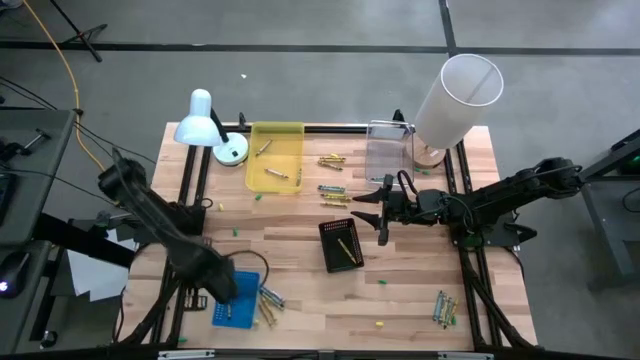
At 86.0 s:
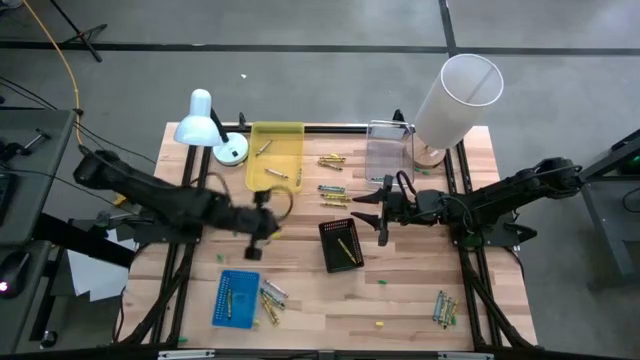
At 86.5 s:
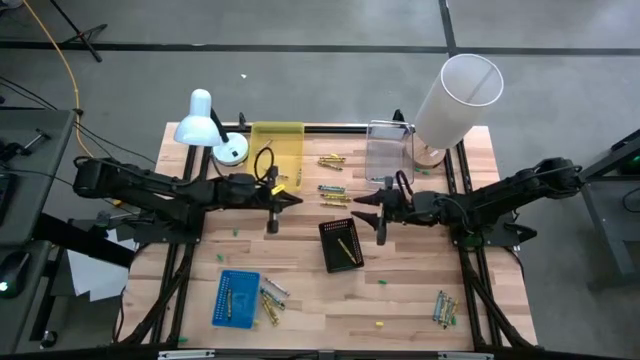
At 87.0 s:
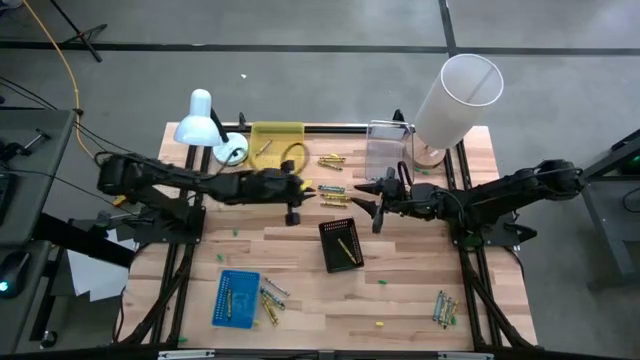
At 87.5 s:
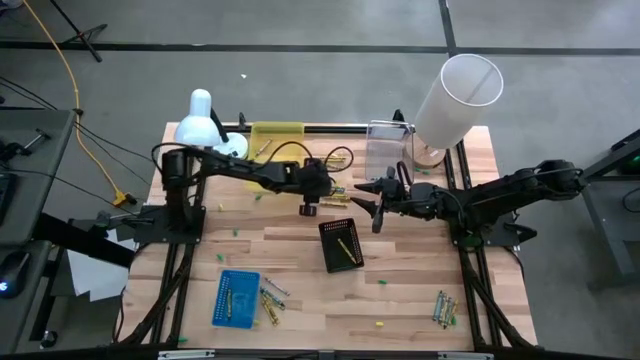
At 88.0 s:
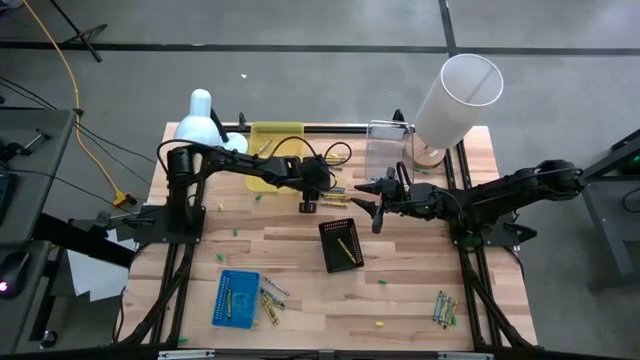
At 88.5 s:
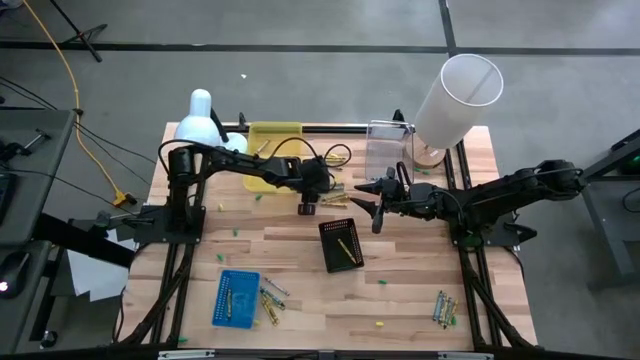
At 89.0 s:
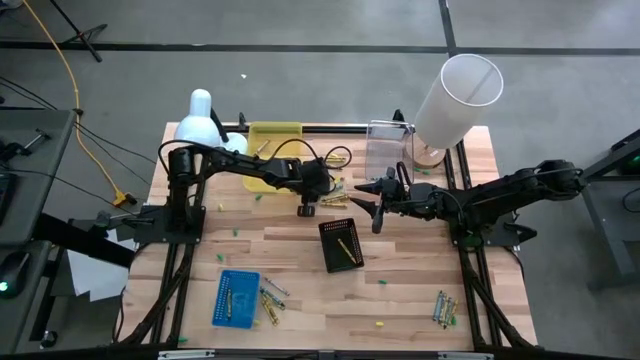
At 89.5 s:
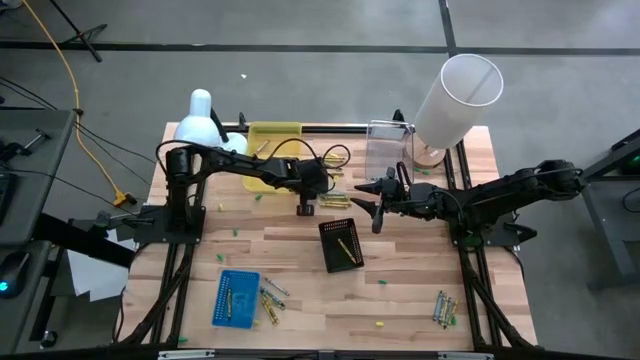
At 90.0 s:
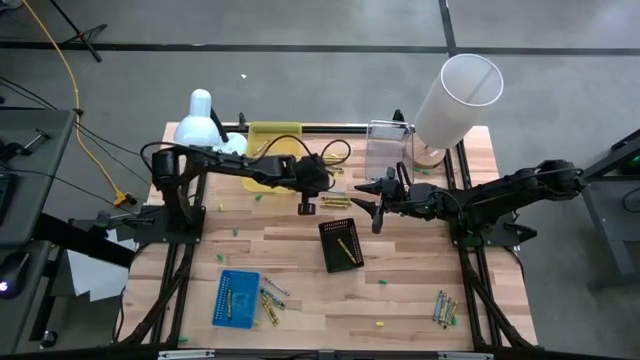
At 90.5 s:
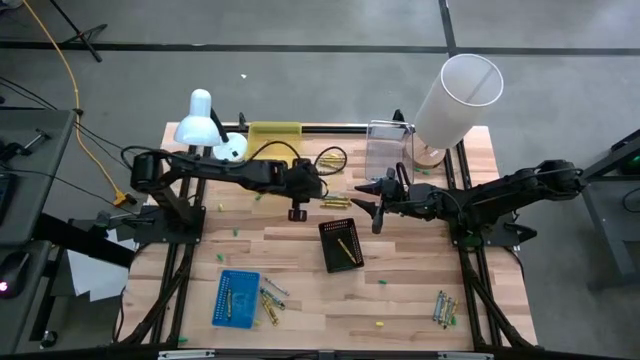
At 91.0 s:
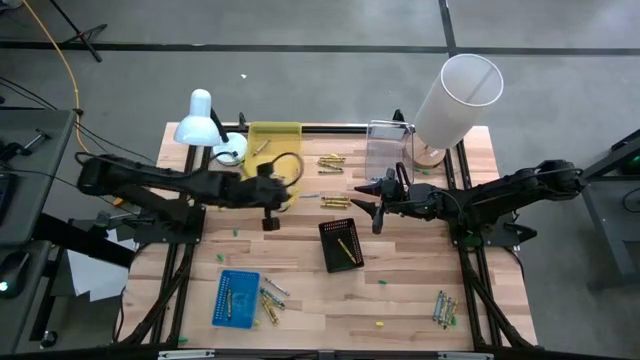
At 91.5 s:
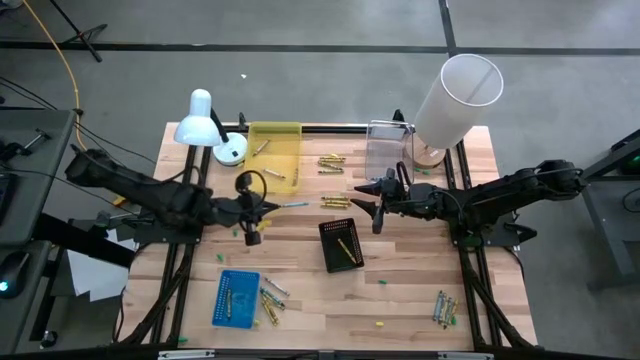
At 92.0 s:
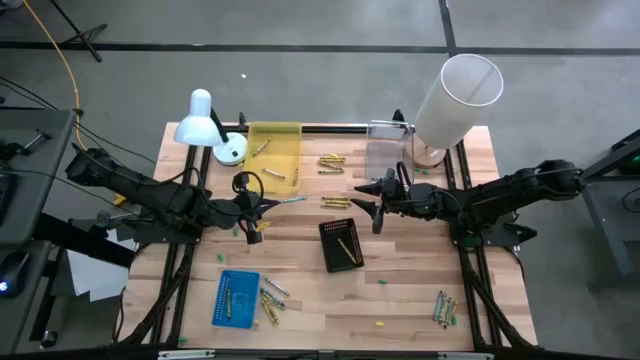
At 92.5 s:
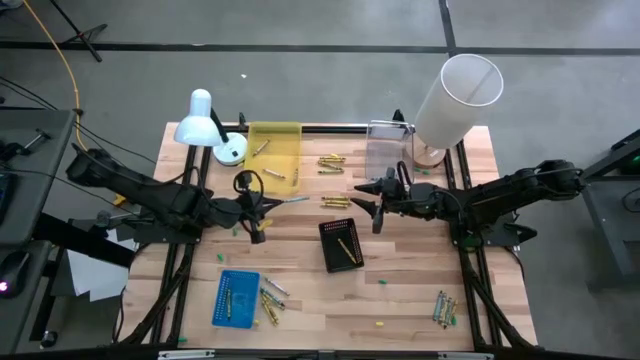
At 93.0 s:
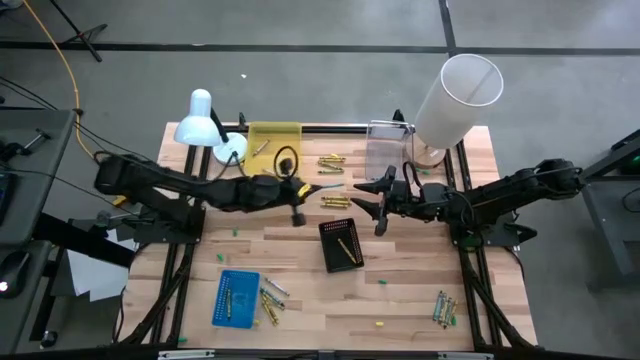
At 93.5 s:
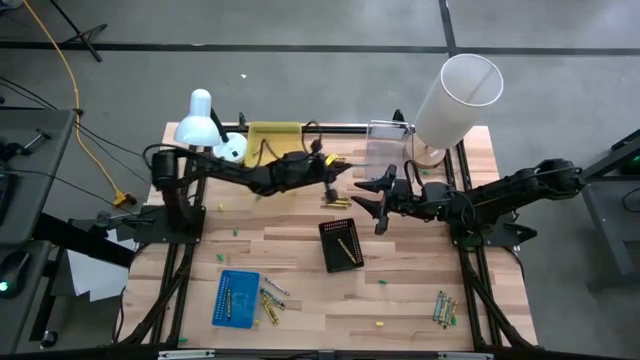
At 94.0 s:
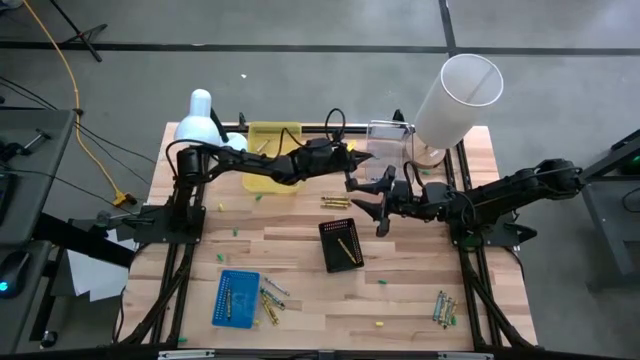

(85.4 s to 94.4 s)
Task: Sort crayons
Put the blue crayon into the transparent bin

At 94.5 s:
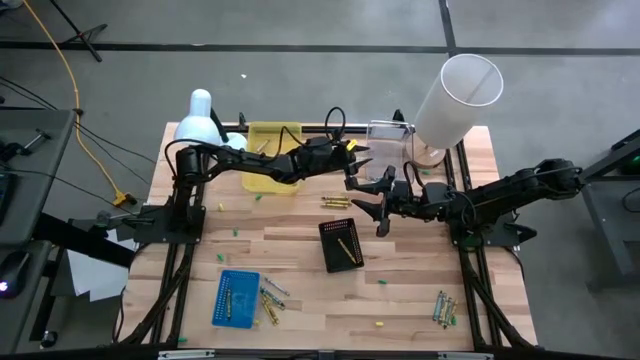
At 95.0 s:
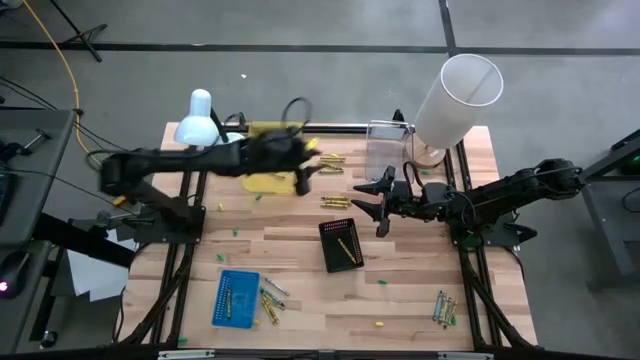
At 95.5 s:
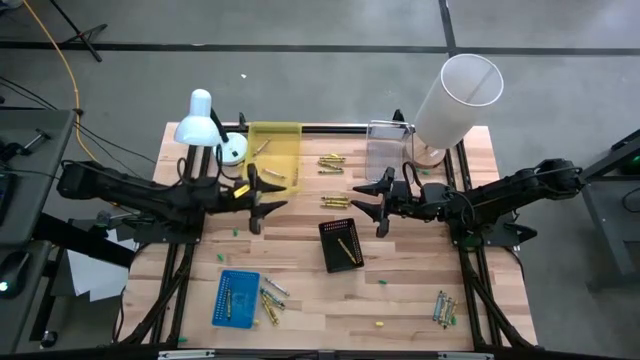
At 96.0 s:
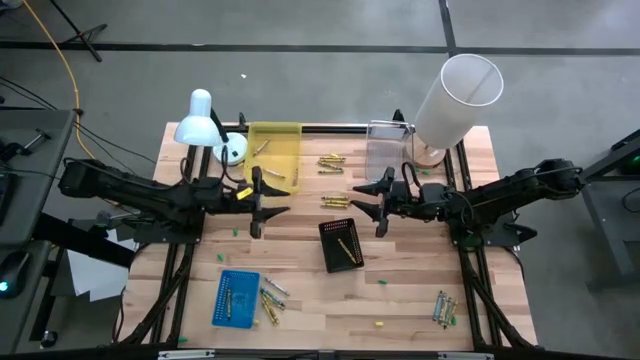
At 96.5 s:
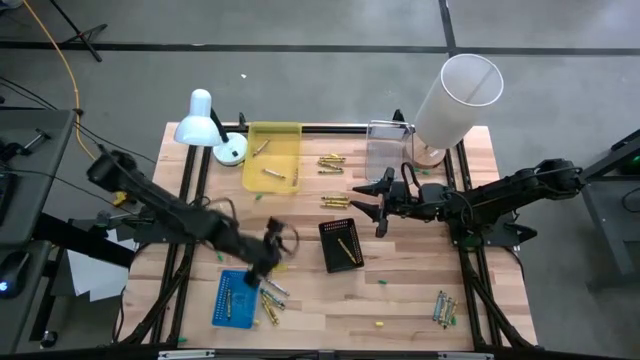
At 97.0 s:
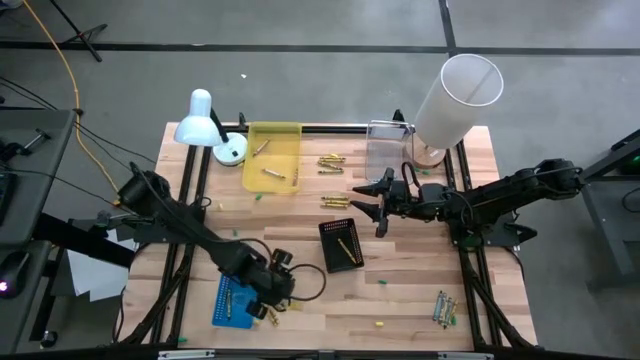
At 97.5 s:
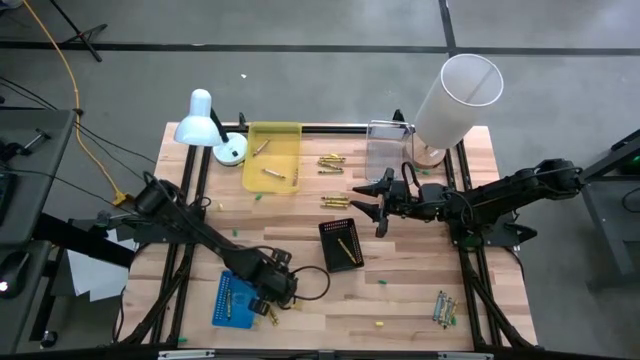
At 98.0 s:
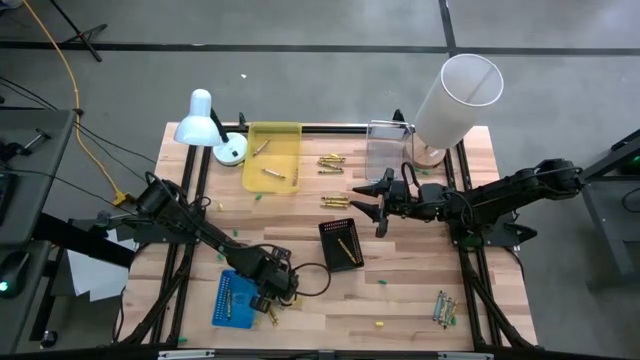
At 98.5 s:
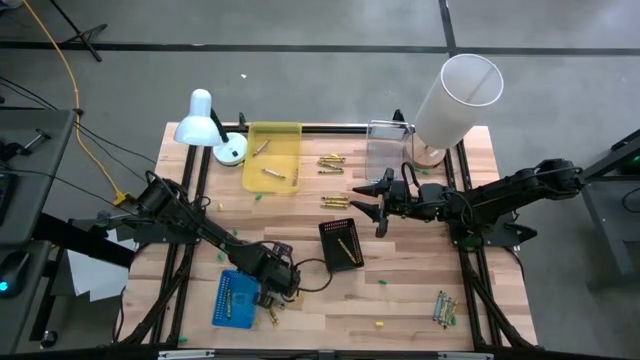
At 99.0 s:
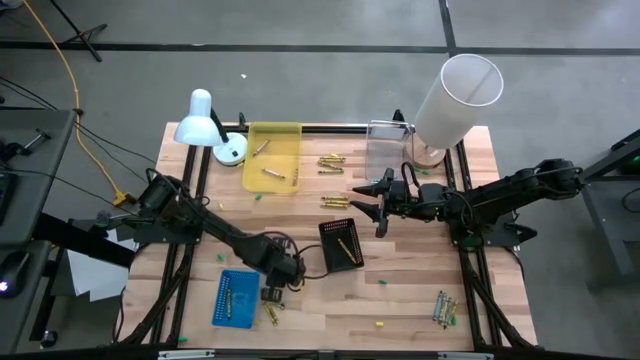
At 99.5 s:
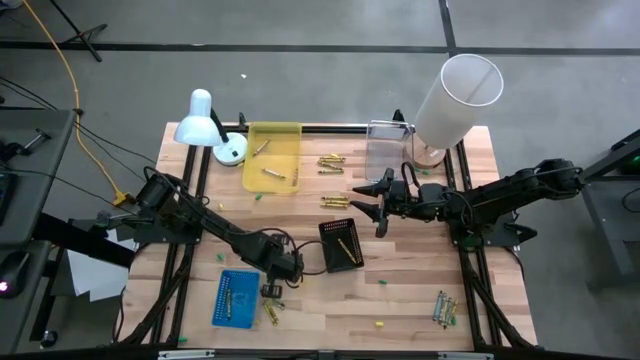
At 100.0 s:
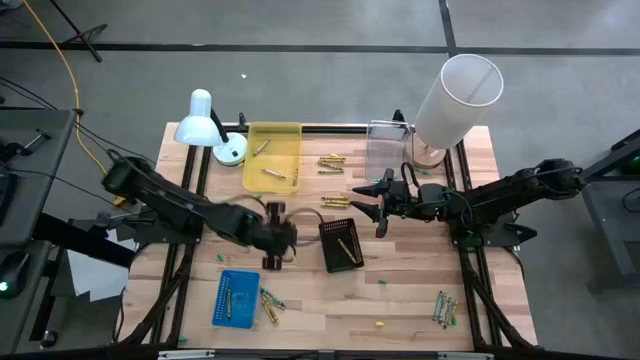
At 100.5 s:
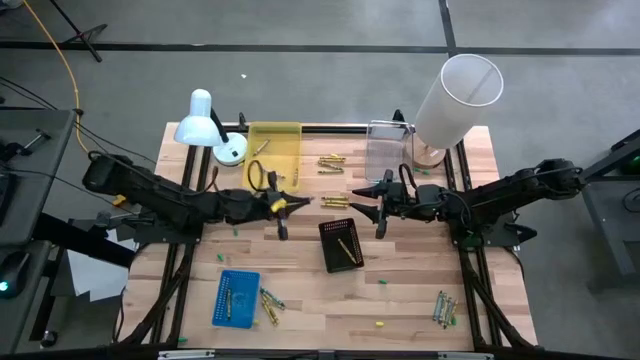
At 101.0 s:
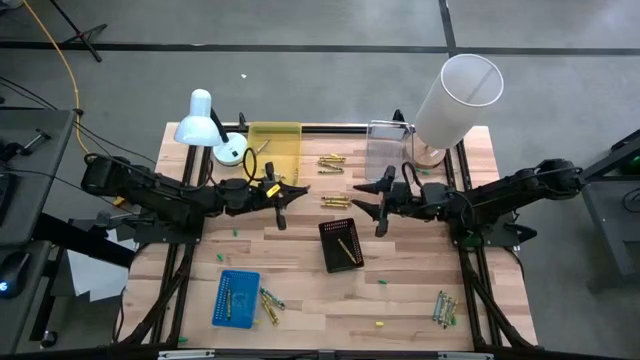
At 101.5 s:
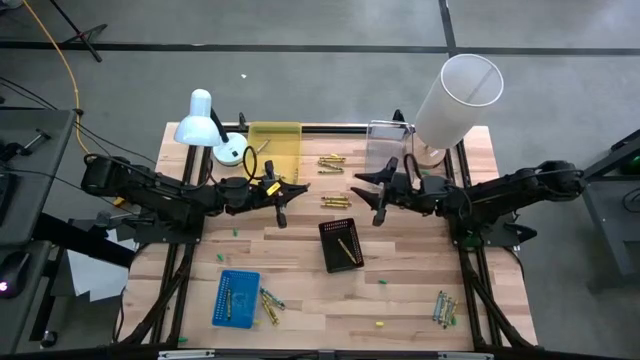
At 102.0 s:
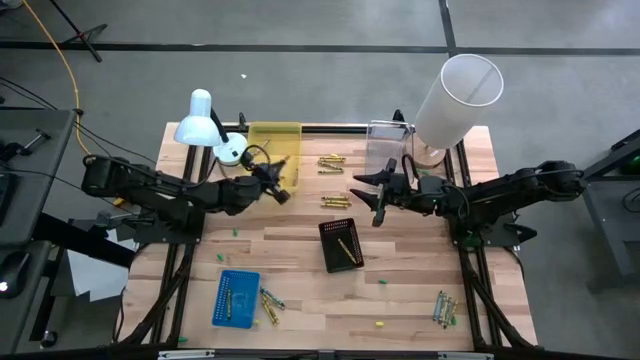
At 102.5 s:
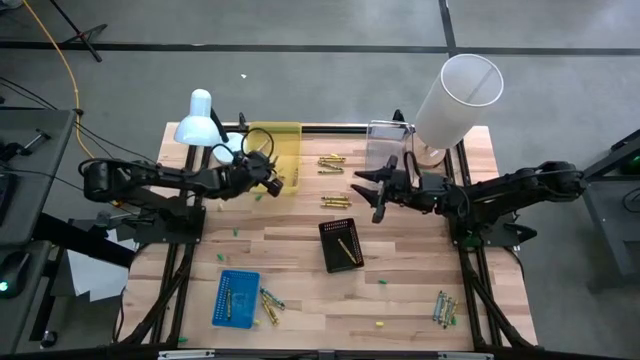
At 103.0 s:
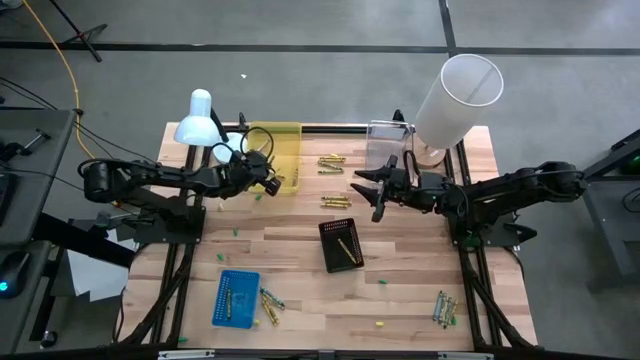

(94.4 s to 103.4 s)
Put the gray crayon into the yellow transparent bin

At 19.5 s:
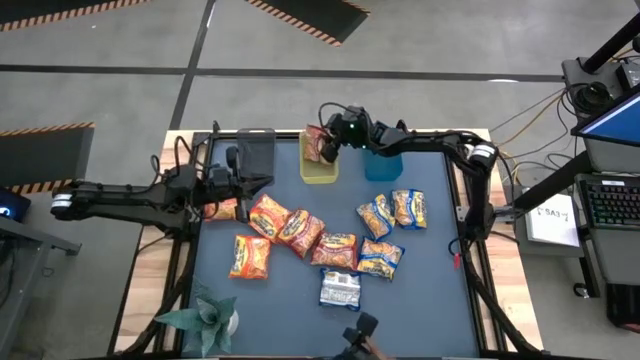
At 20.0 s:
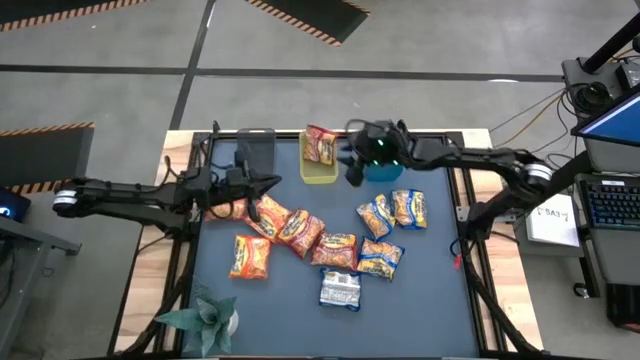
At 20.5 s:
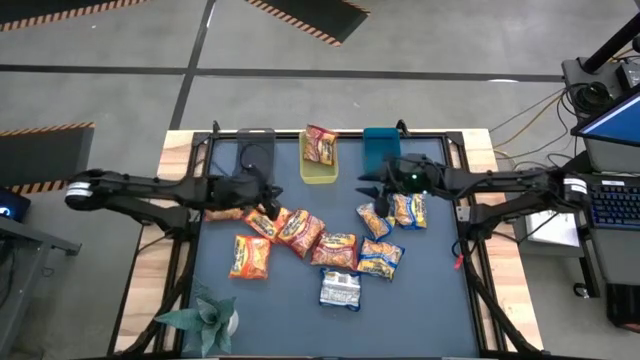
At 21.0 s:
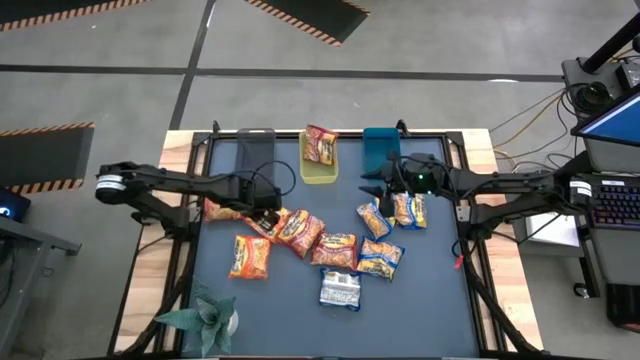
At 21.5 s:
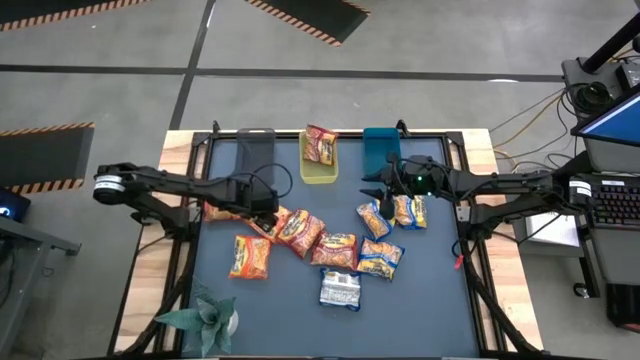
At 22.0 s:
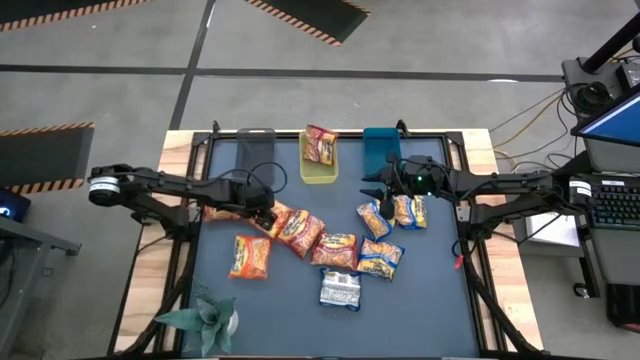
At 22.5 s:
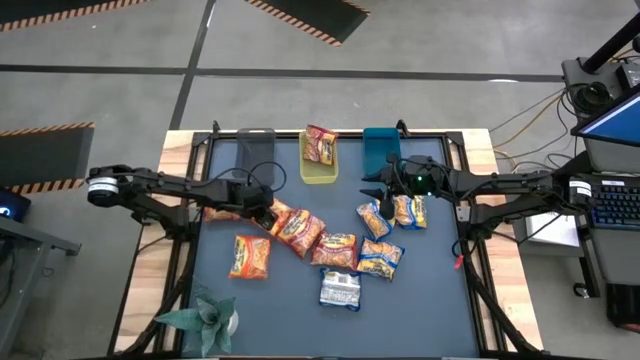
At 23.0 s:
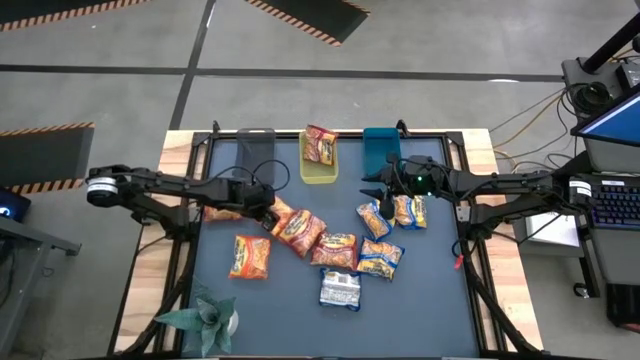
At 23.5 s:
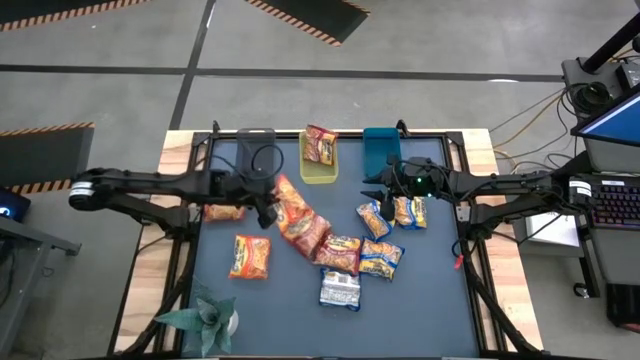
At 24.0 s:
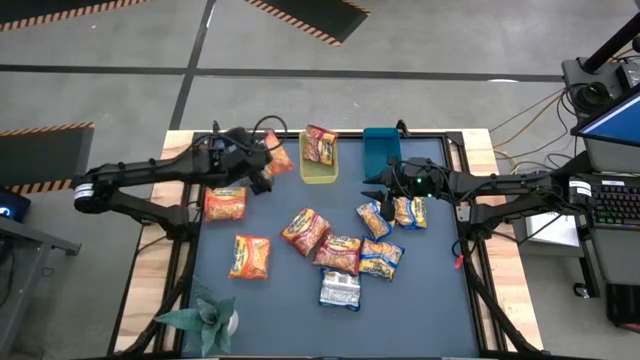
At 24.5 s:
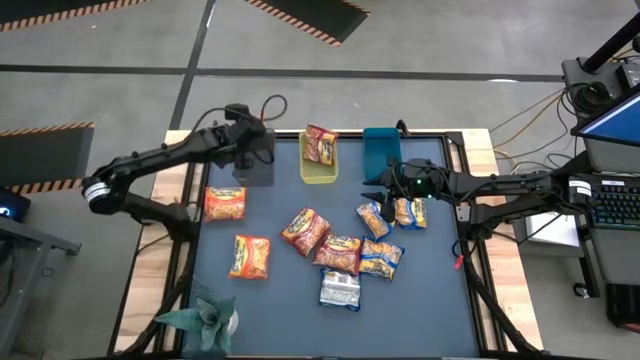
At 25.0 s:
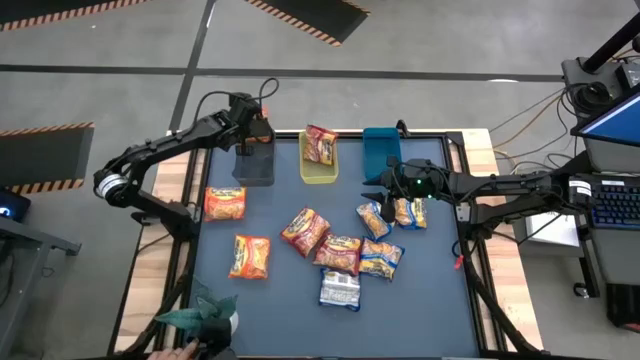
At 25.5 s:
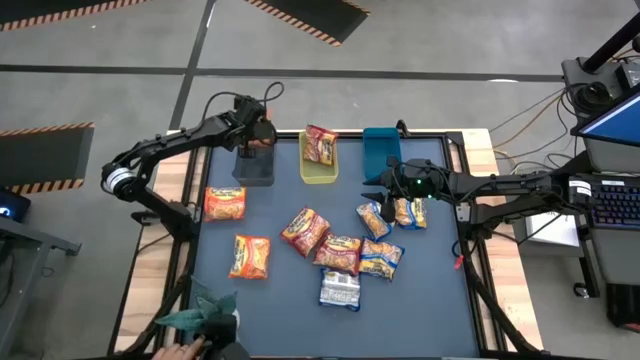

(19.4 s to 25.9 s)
Task: Sort Maruchan noodles
Put the orange noodle pack into the black bin
